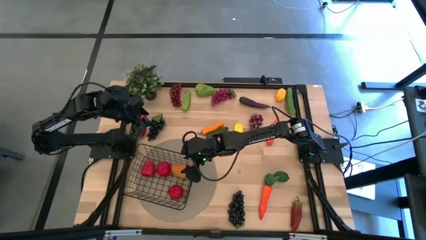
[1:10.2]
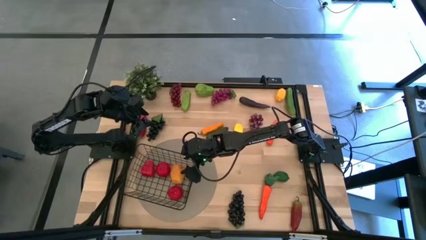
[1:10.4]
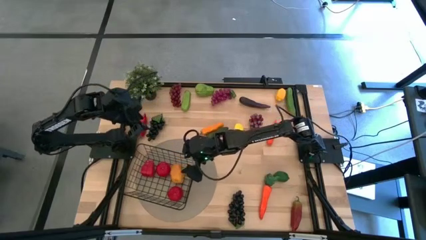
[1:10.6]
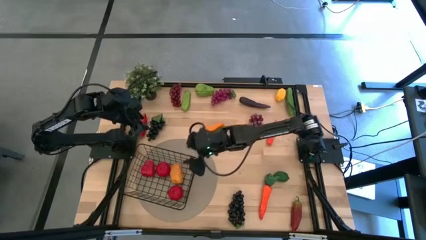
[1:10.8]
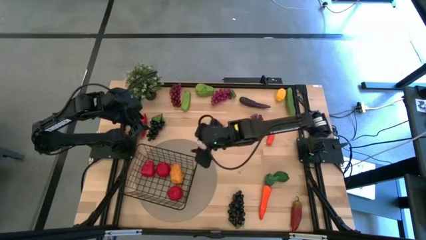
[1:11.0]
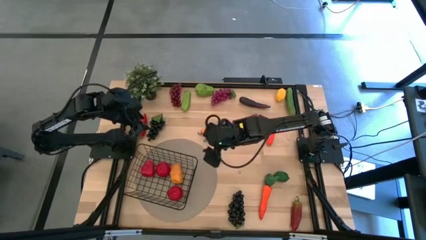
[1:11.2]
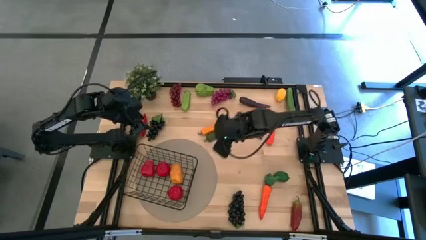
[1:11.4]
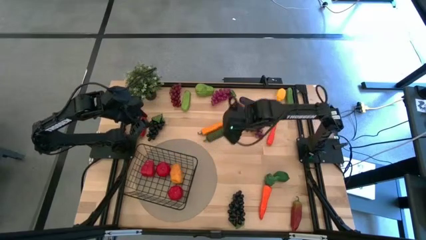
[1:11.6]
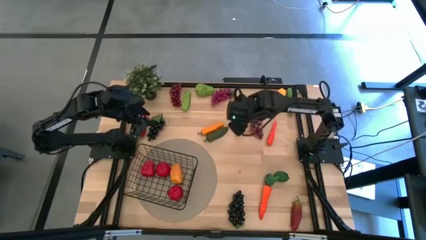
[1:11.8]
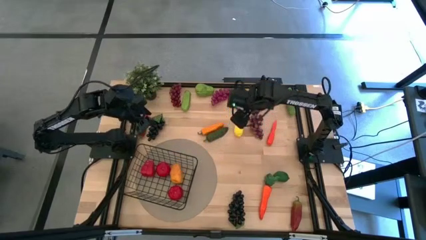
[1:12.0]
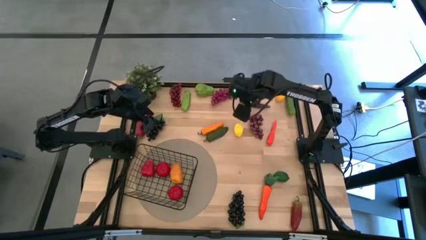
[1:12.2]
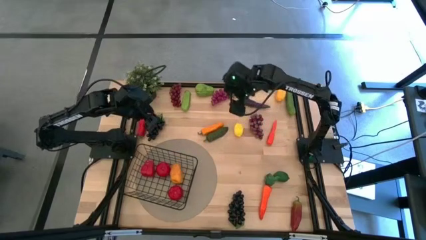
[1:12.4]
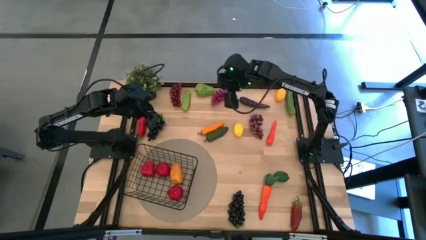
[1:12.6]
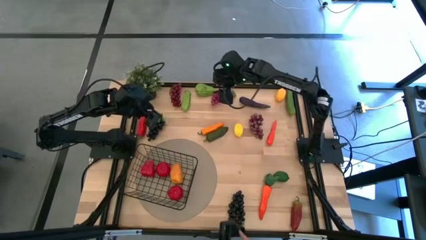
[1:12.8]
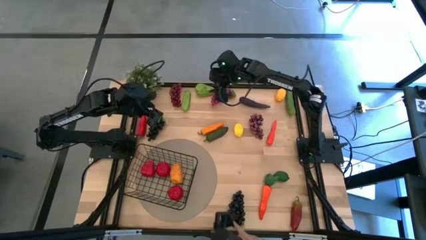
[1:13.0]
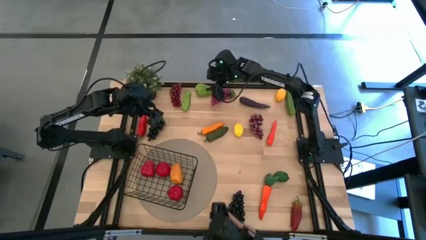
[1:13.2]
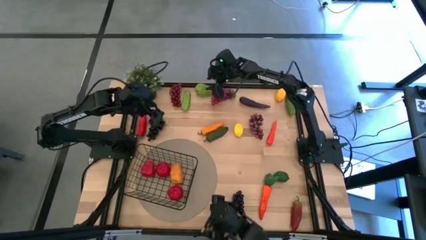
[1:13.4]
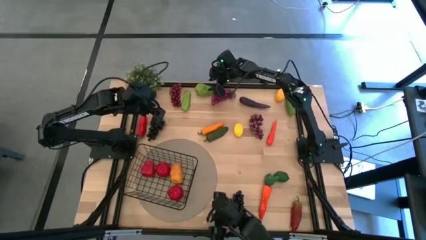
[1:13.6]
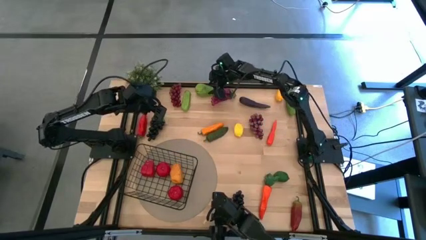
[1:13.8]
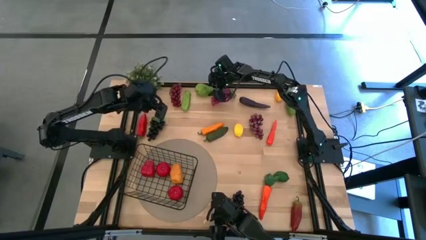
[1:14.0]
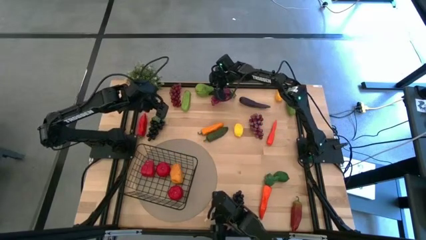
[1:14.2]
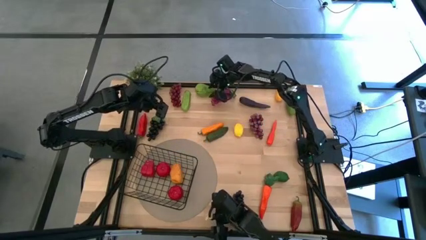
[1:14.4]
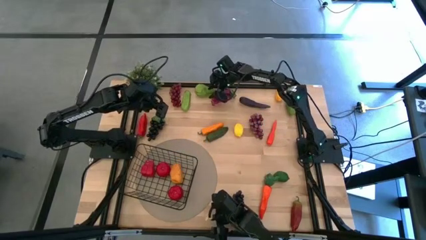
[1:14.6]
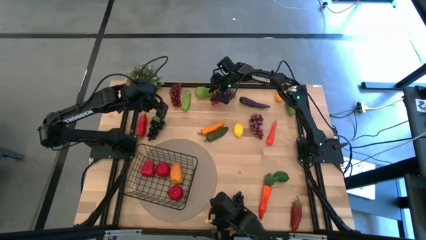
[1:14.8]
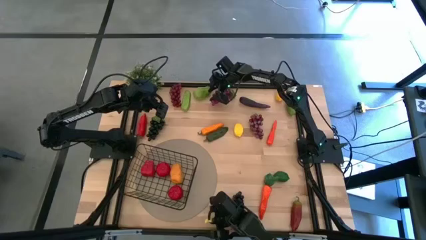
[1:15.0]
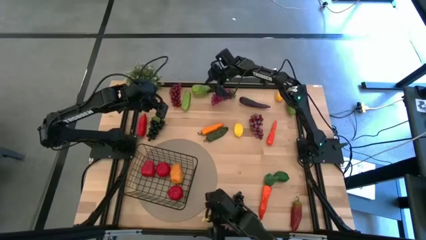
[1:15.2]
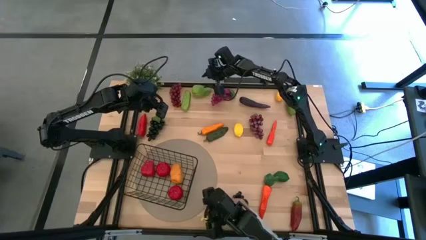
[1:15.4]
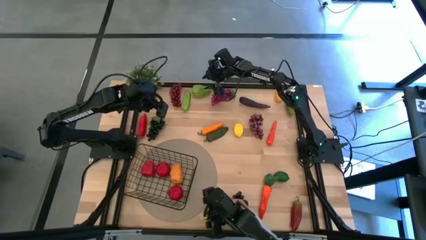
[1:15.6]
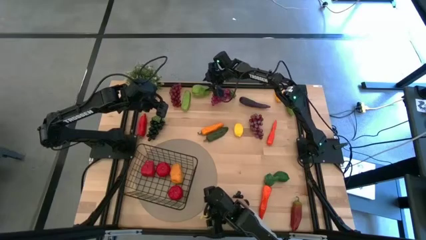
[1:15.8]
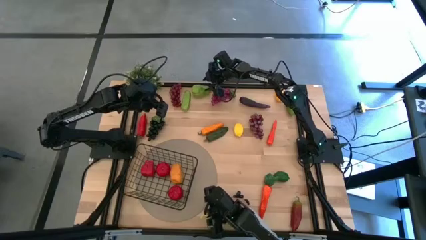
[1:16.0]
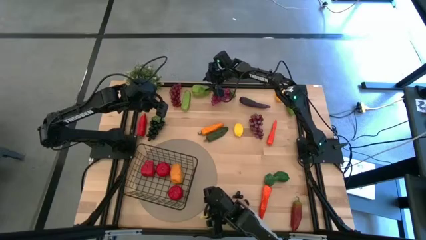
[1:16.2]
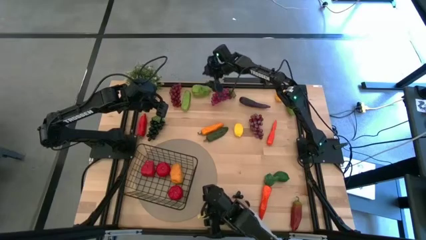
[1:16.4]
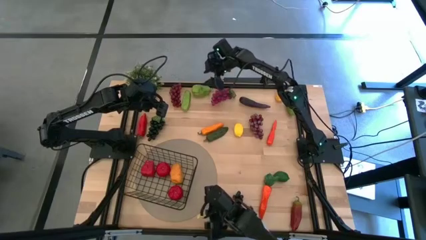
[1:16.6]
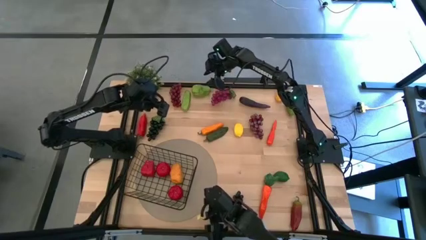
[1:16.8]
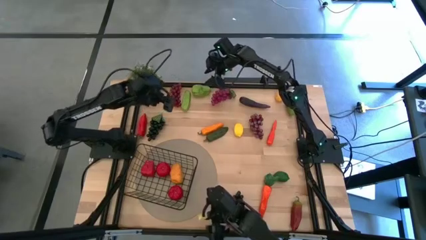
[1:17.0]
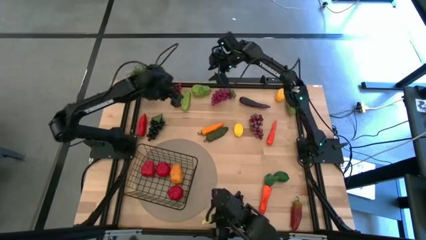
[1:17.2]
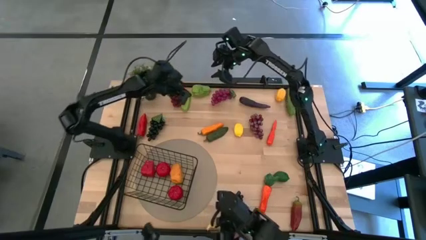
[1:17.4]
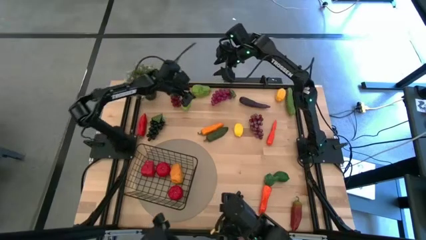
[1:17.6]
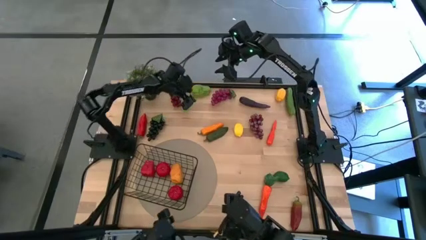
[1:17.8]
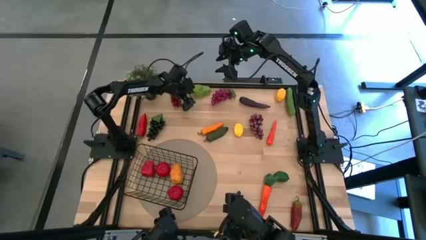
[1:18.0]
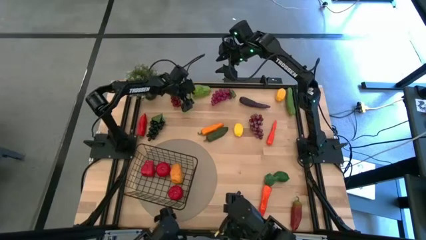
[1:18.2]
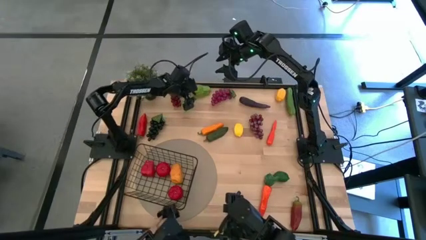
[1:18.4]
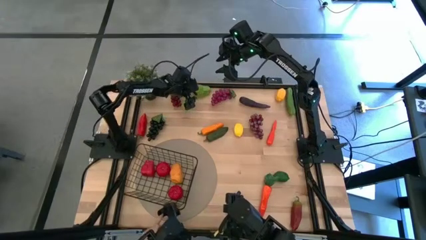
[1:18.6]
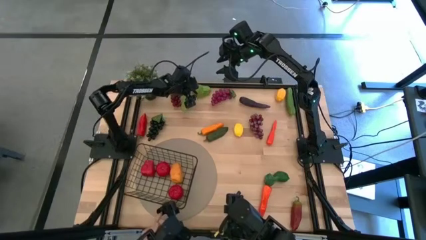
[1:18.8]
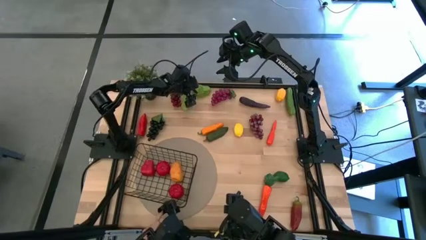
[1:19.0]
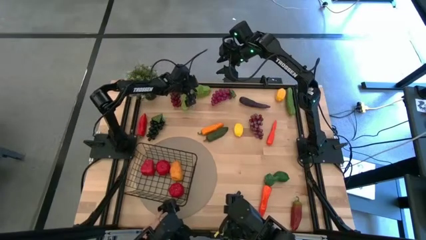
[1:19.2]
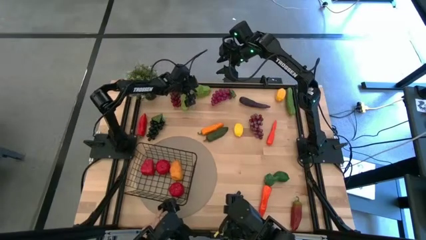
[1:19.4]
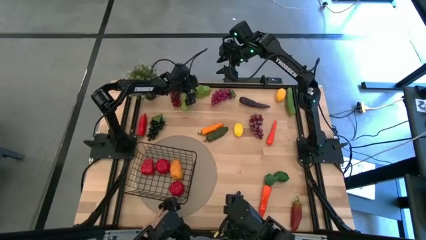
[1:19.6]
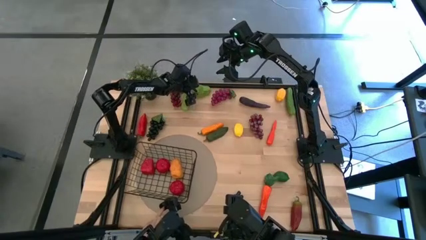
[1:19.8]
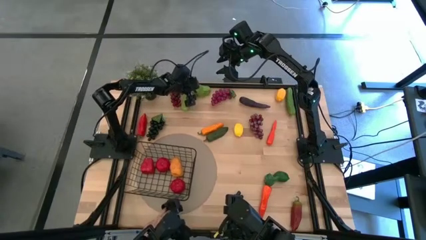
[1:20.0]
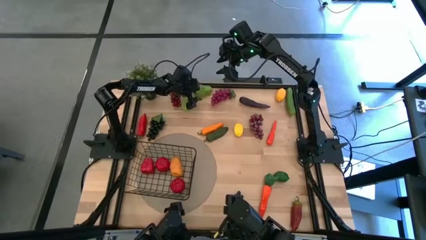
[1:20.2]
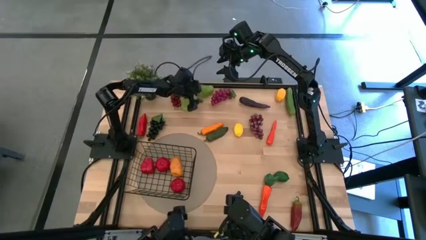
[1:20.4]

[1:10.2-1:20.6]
Task: Build produce basket
Put the green chayote into the black wire basket
